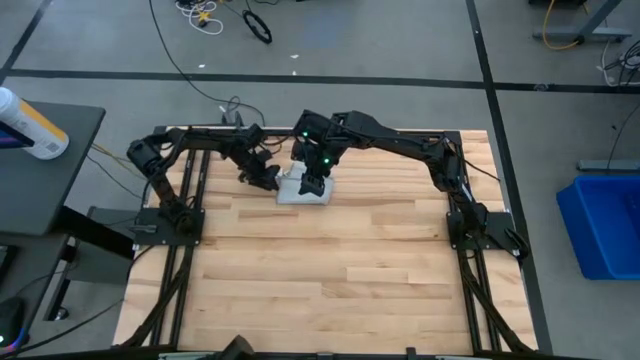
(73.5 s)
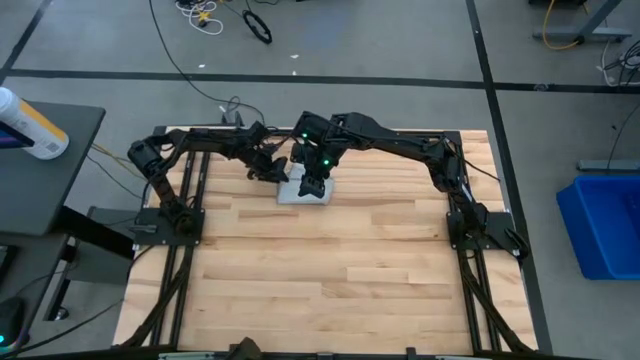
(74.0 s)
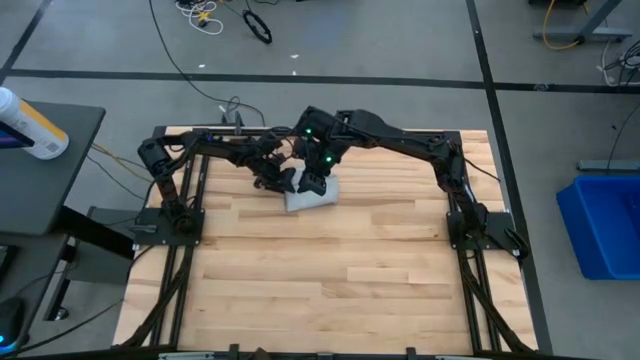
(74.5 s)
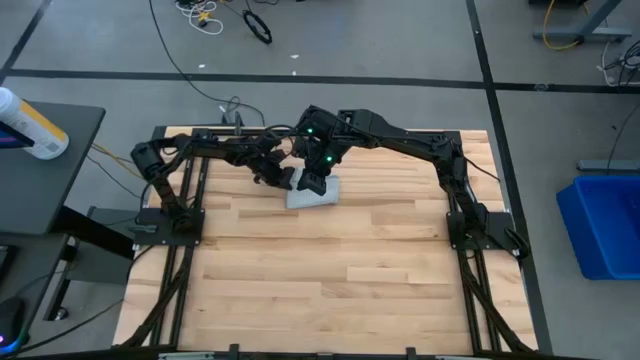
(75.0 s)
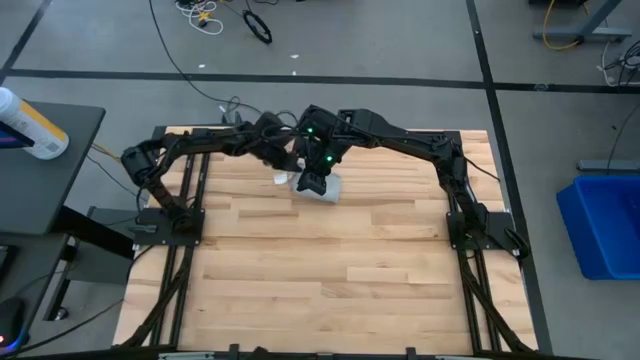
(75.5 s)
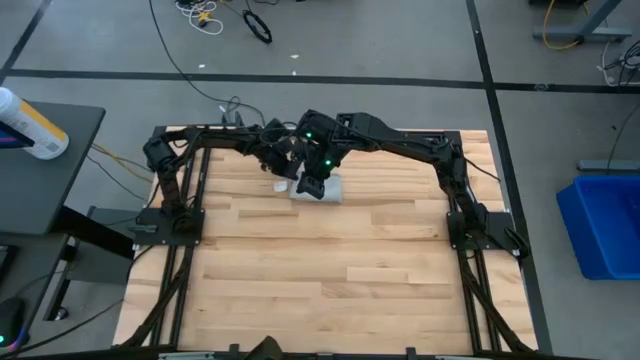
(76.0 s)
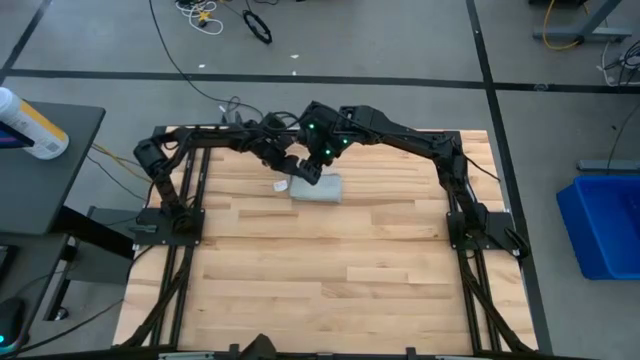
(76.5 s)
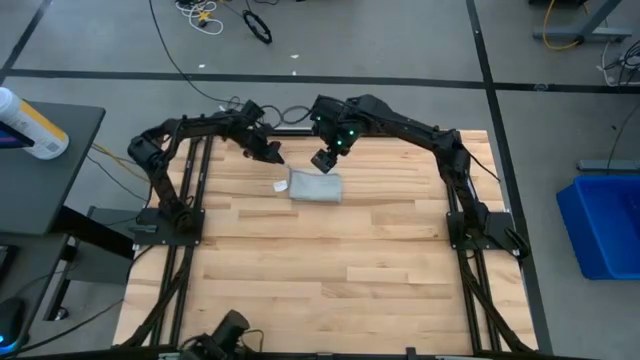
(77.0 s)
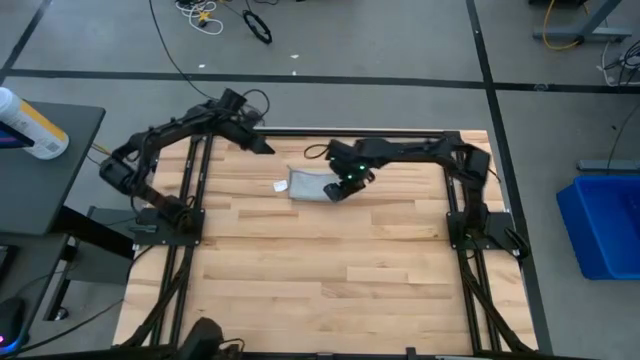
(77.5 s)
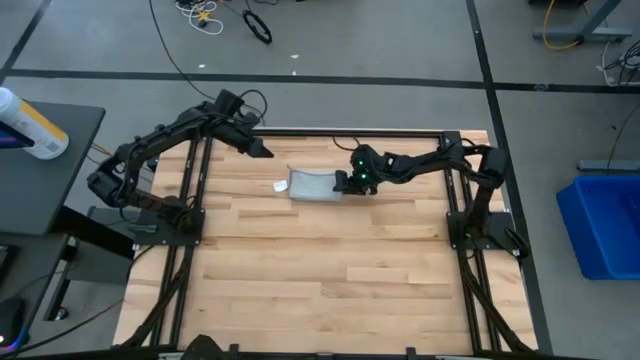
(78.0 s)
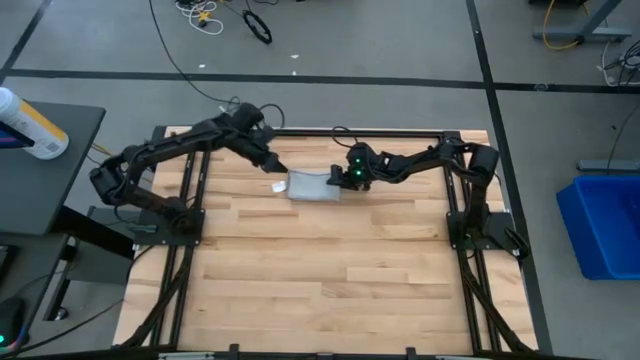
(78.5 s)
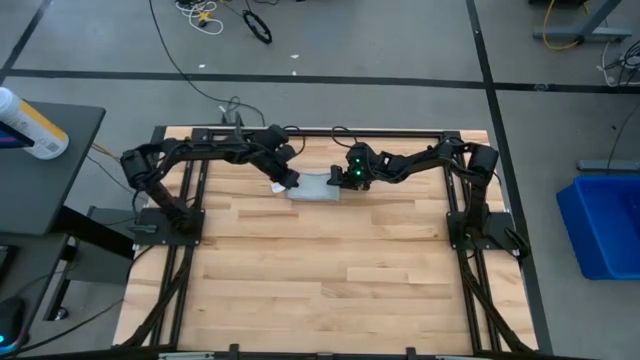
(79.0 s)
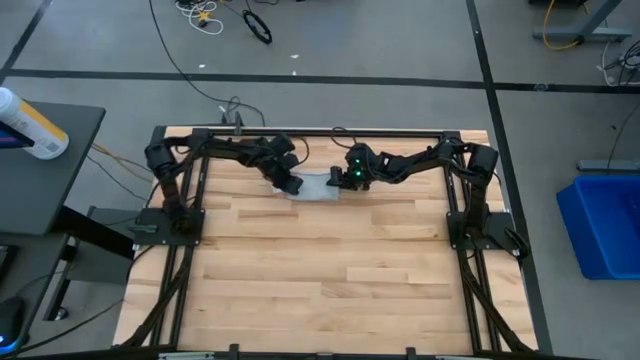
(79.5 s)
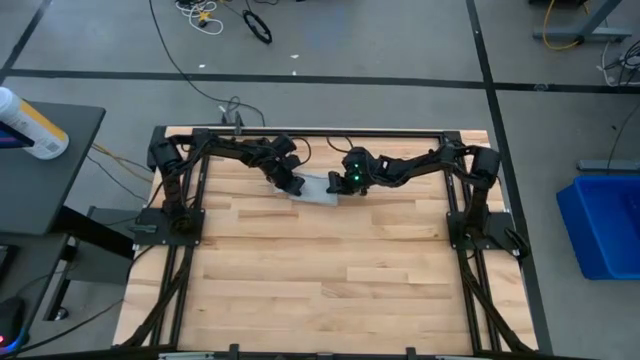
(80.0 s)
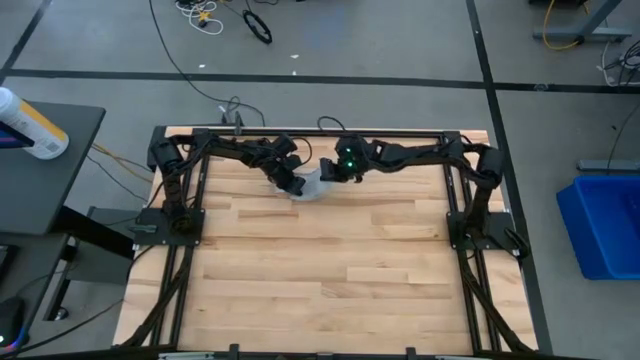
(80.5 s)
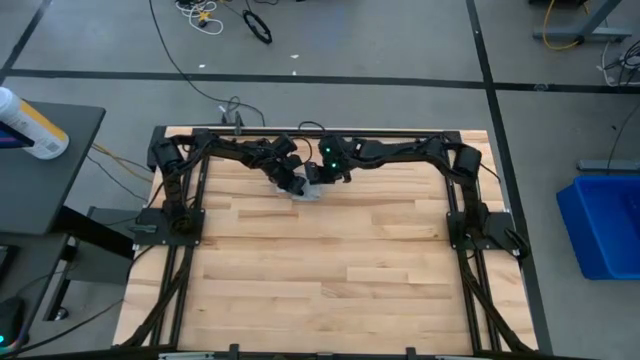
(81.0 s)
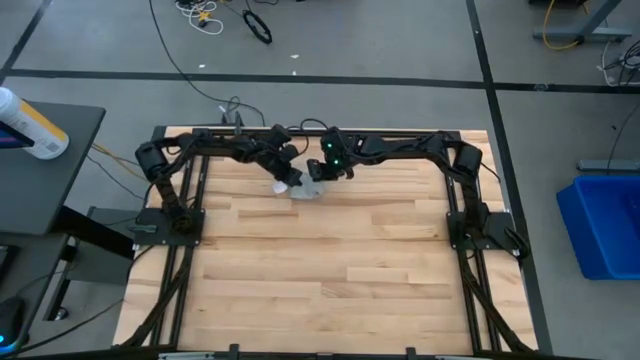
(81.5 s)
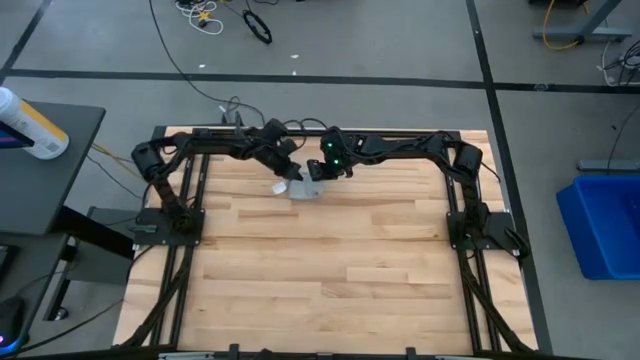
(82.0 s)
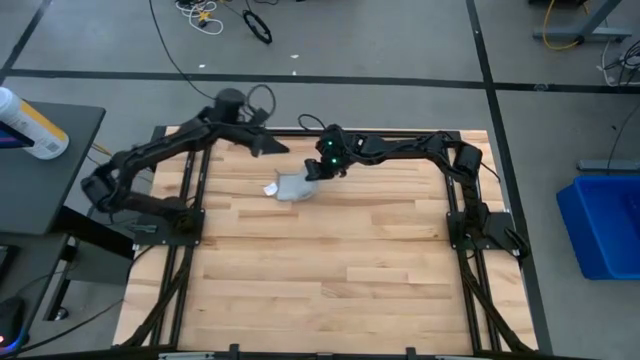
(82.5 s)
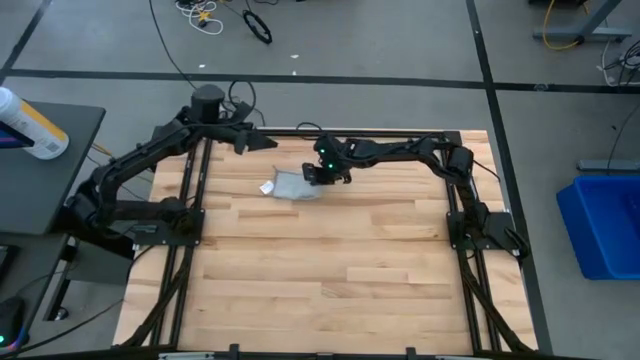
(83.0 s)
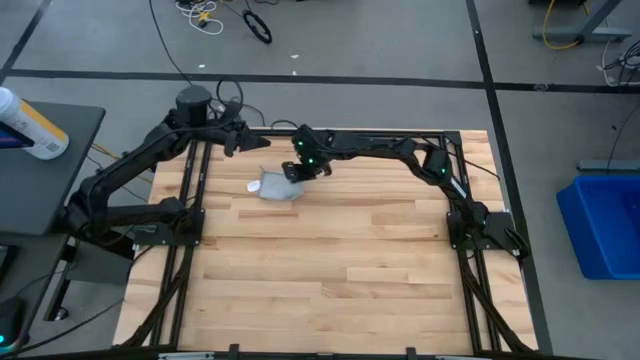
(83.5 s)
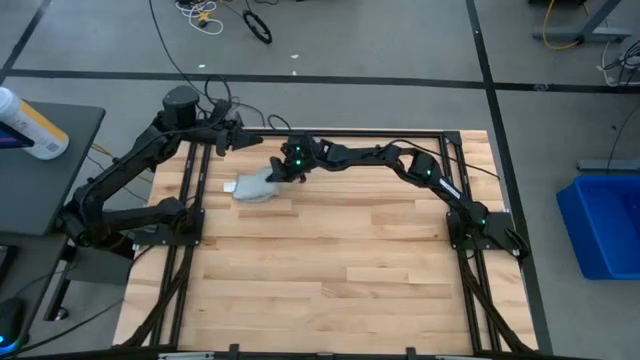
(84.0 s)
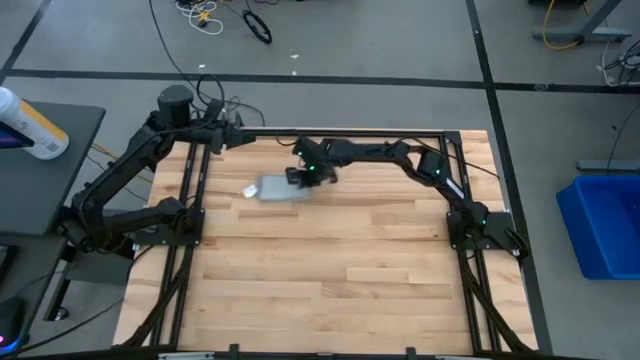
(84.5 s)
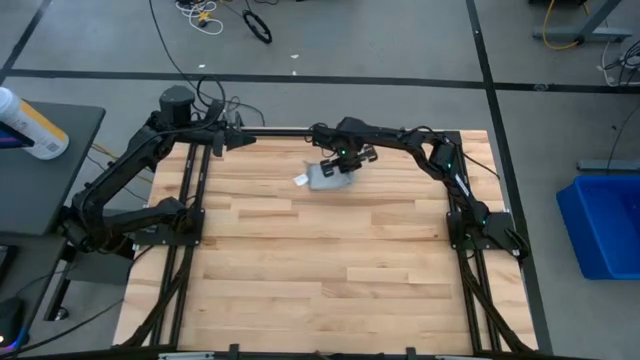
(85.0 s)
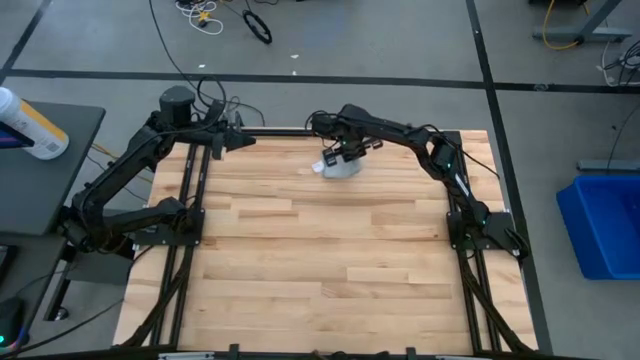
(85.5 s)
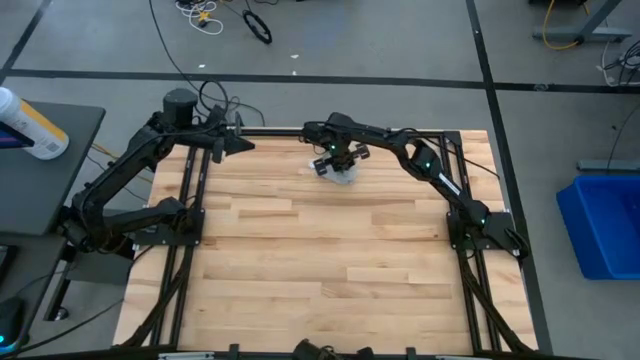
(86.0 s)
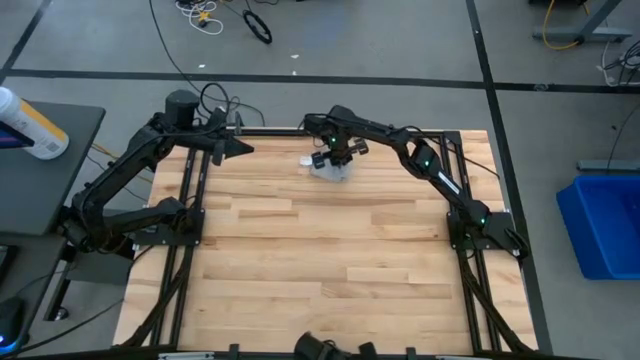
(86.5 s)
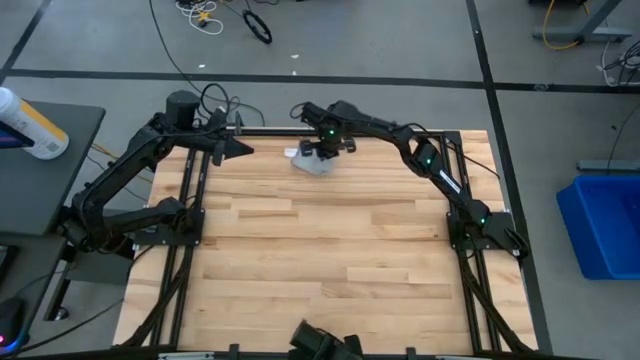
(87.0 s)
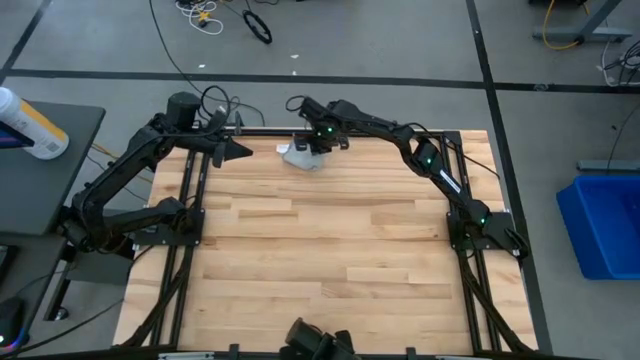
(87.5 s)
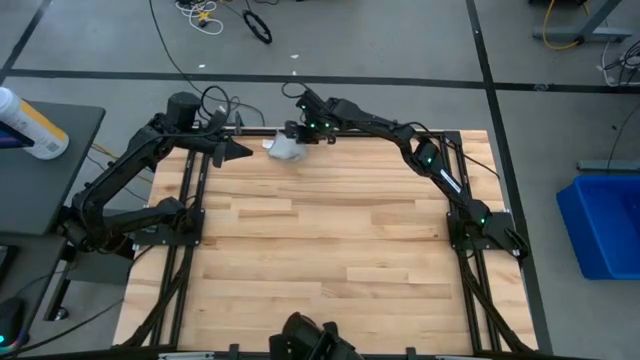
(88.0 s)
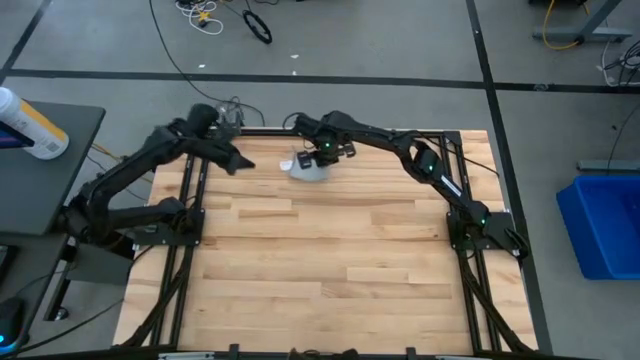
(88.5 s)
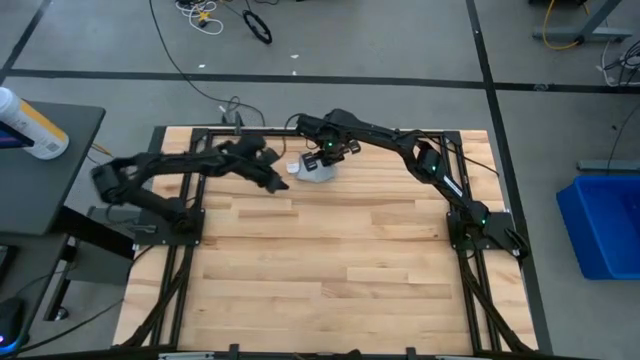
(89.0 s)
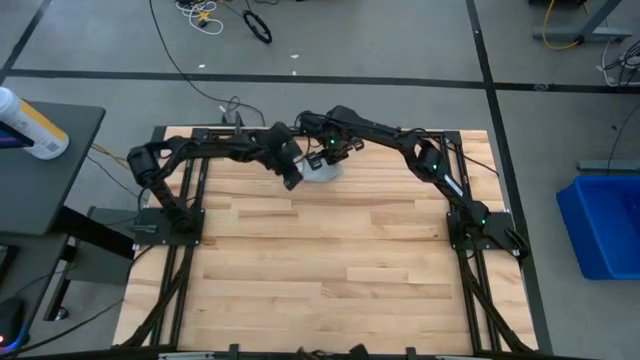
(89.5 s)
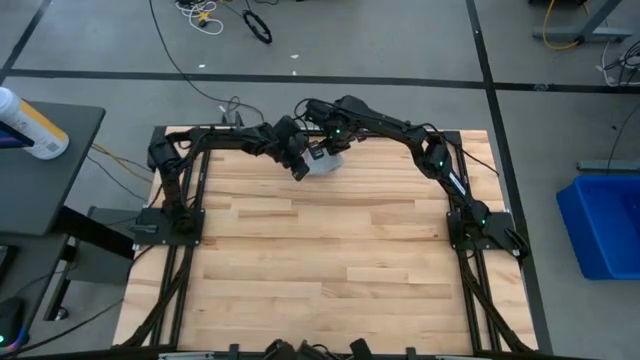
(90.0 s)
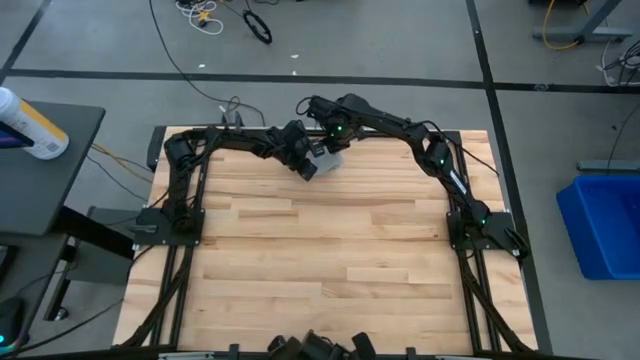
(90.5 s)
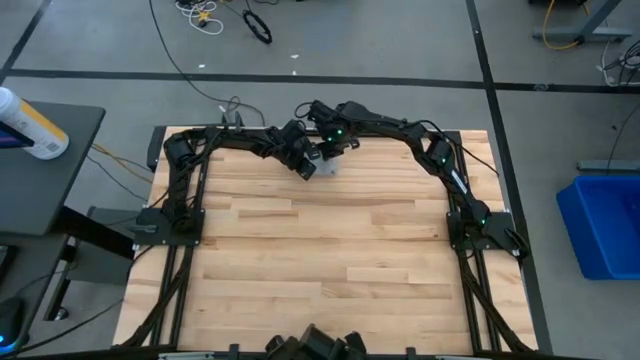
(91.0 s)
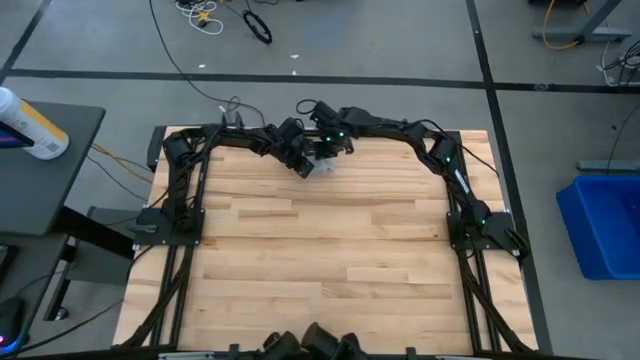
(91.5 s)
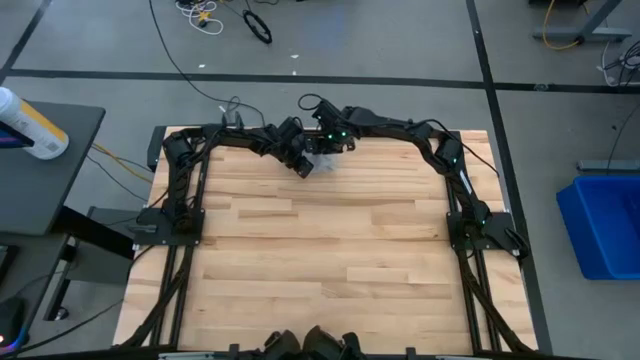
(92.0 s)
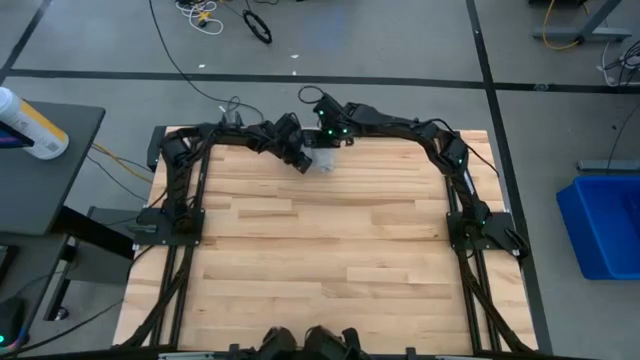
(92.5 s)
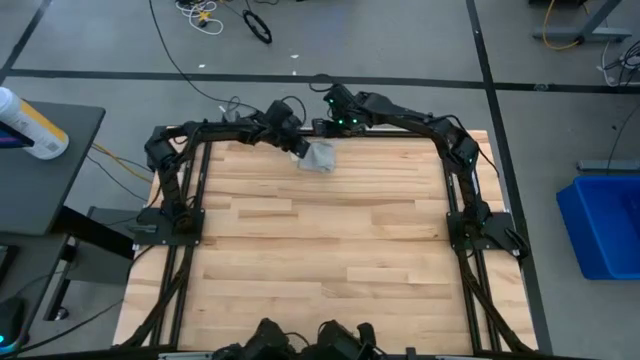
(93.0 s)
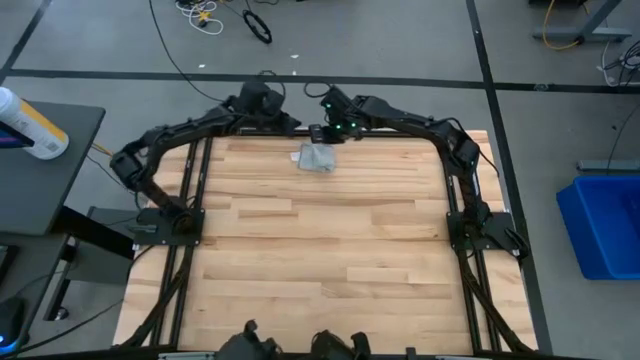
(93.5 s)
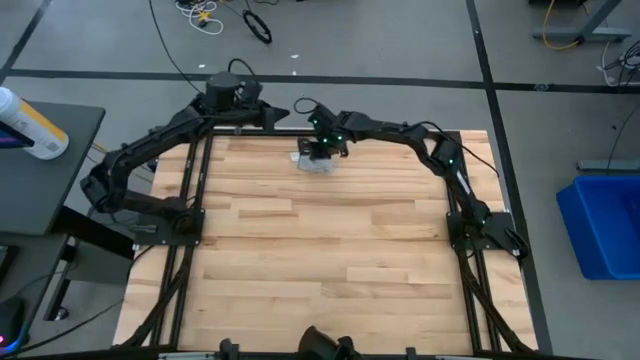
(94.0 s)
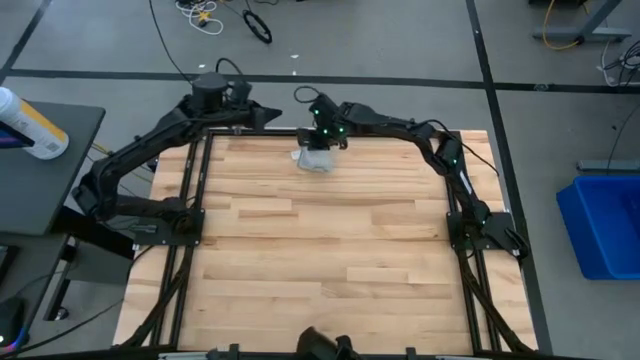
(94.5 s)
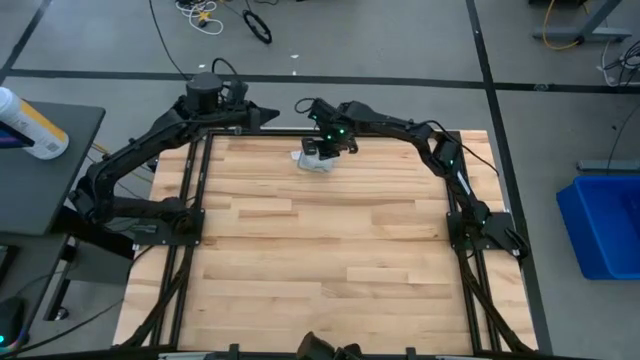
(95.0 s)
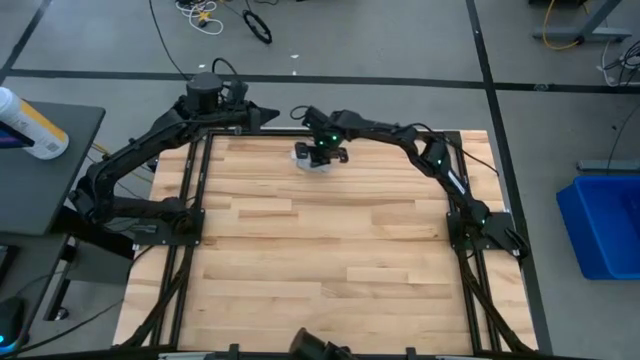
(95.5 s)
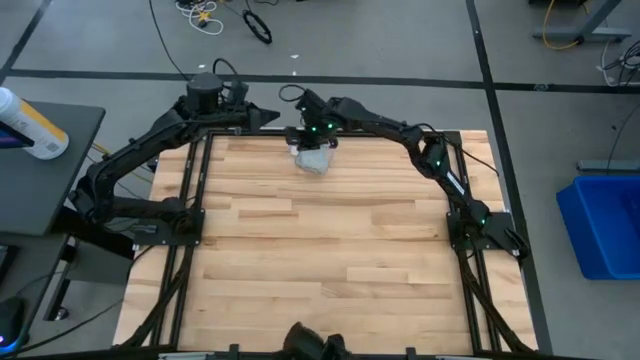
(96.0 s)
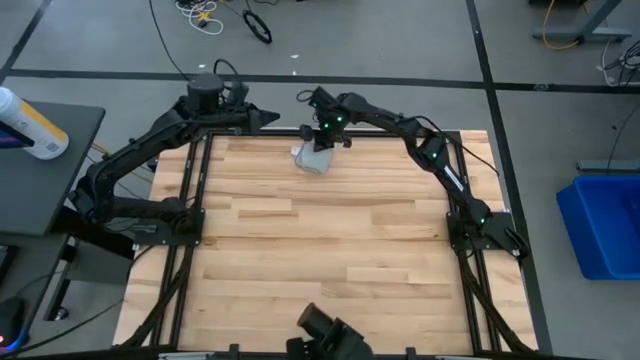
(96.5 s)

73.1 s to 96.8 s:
Task: Fold microfiber towels
Fold the gray towel
